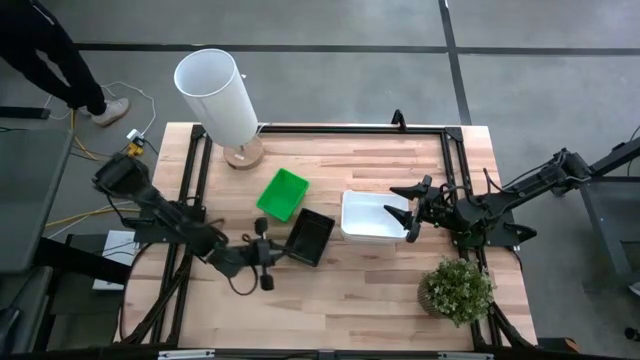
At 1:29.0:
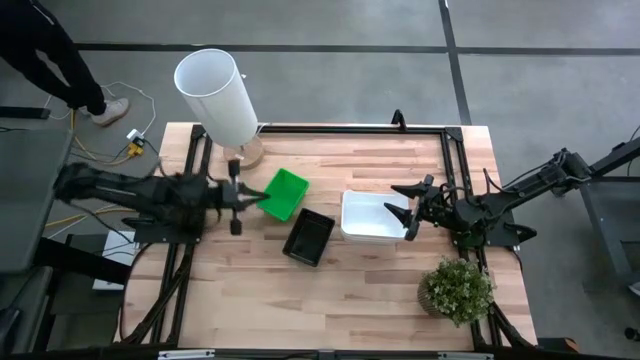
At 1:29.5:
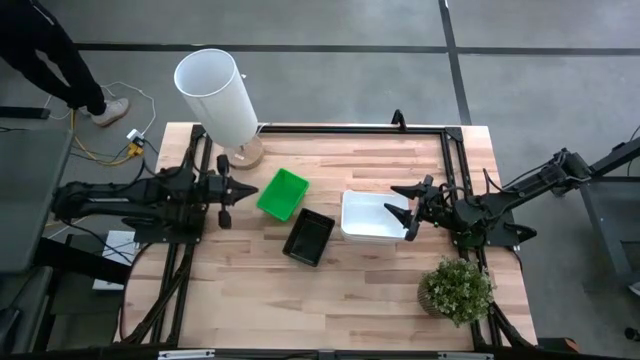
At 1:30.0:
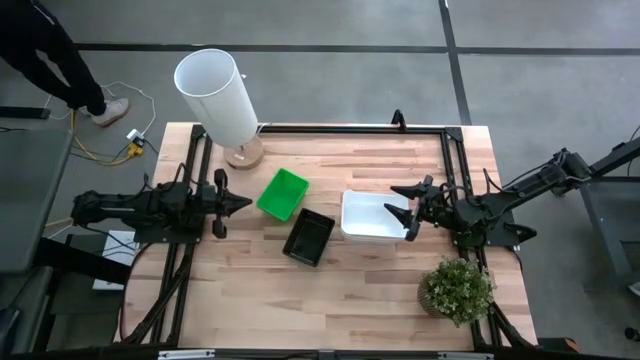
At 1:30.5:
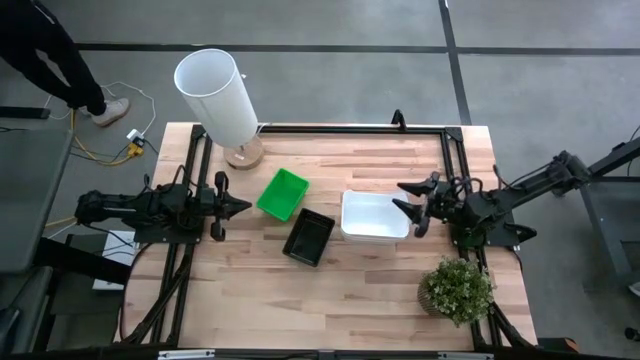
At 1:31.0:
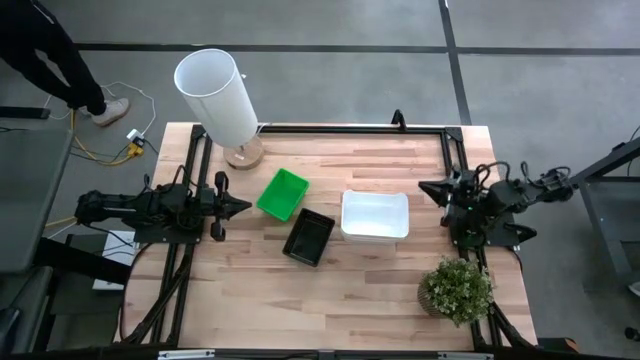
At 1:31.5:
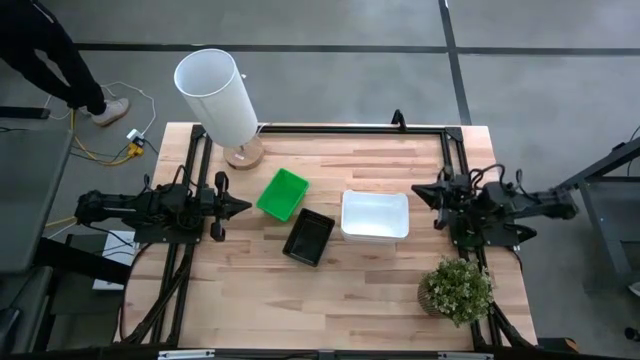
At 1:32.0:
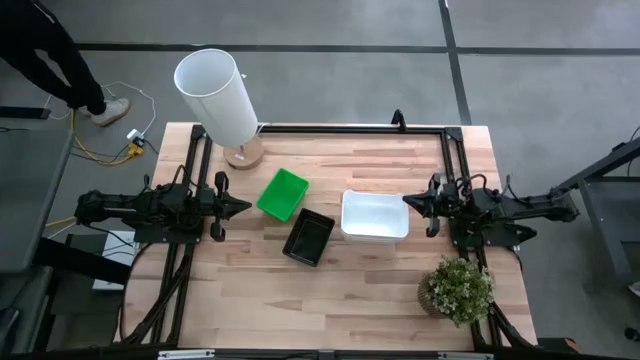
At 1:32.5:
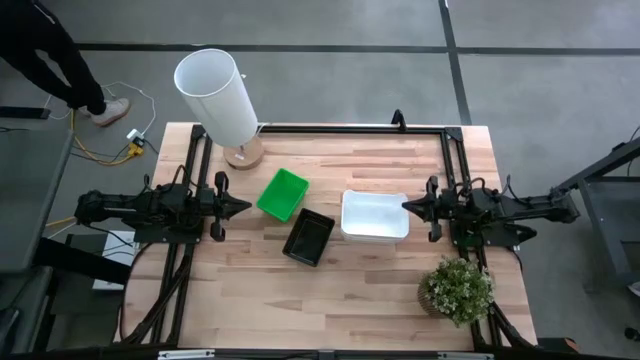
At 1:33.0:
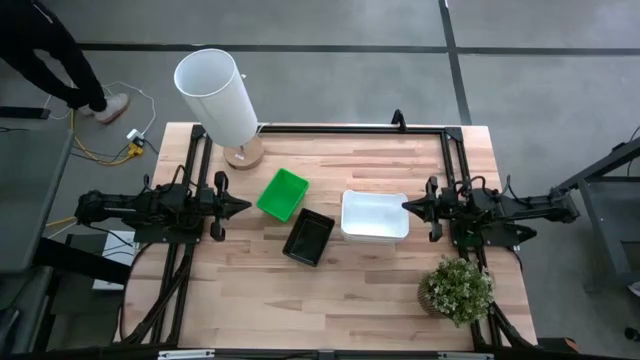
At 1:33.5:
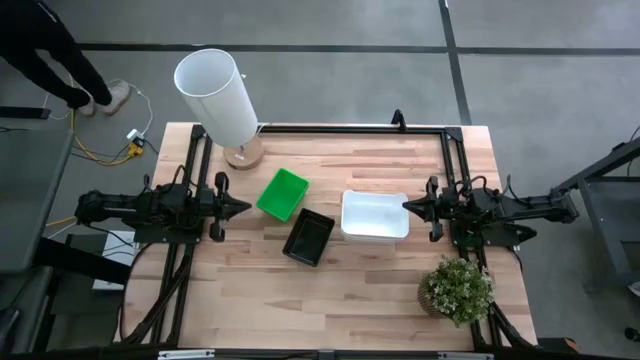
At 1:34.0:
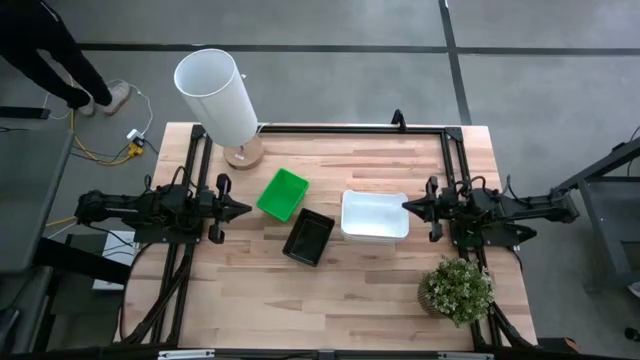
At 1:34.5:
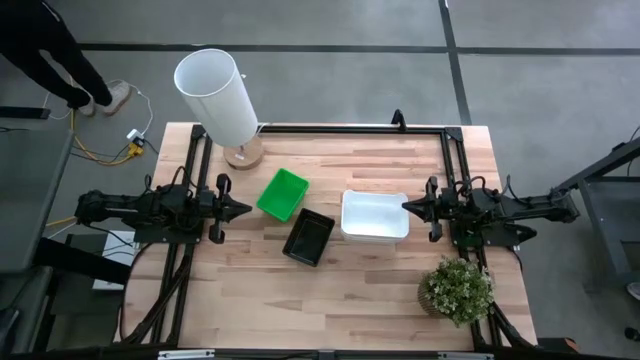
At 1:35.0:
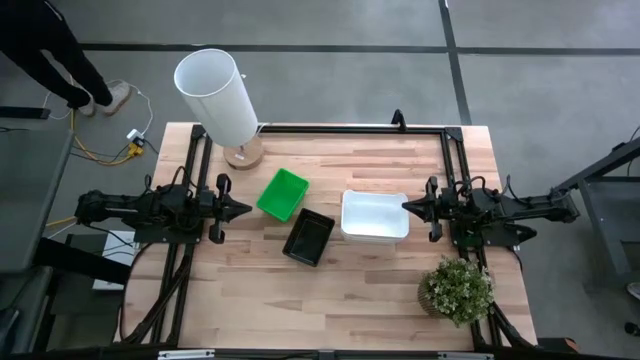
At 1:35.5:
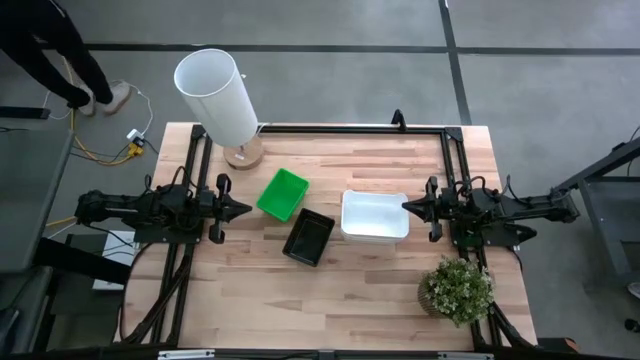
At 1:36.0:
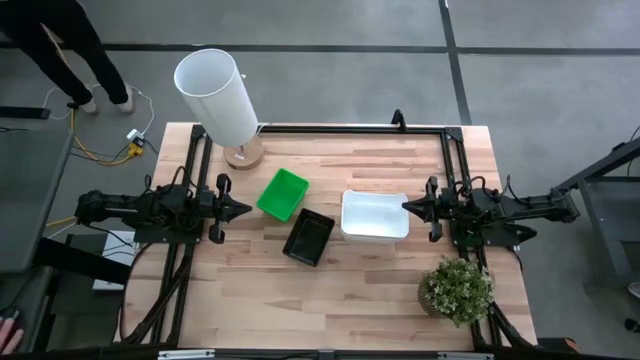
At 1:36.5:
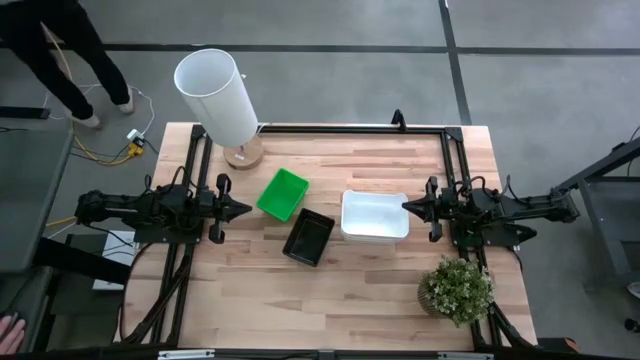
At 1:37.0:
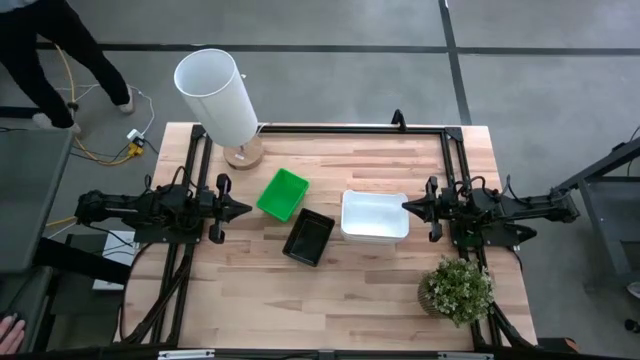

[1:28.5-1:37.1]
Return to Home Position

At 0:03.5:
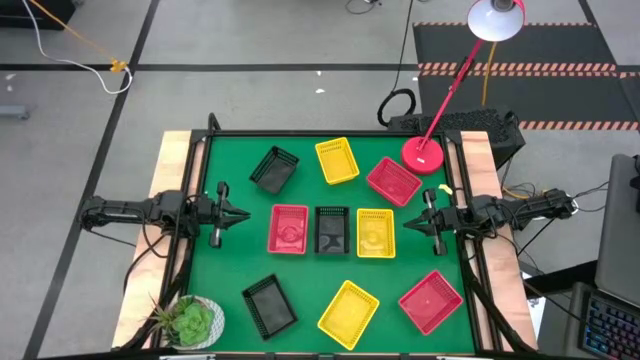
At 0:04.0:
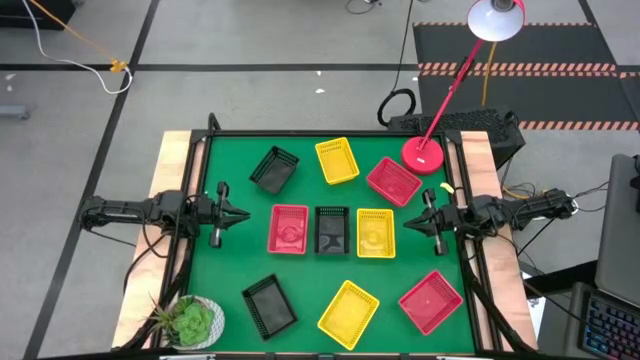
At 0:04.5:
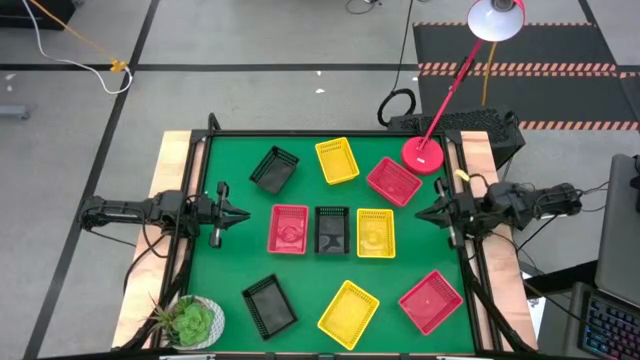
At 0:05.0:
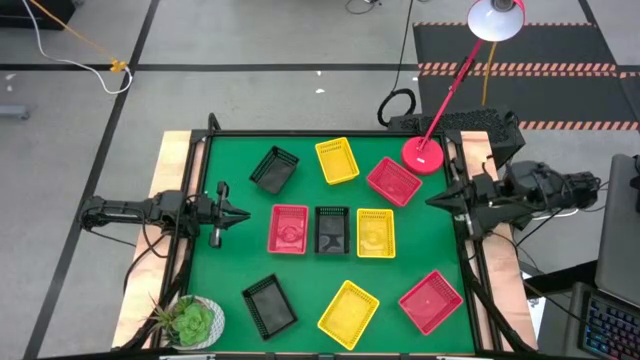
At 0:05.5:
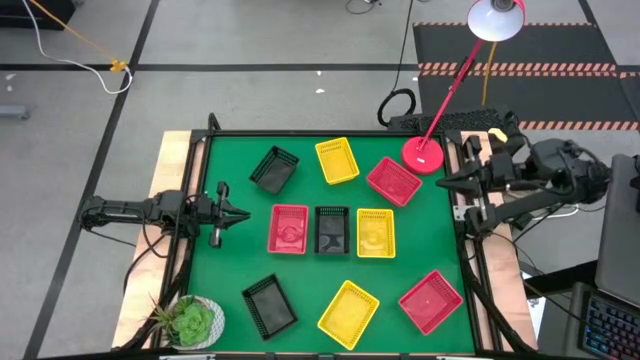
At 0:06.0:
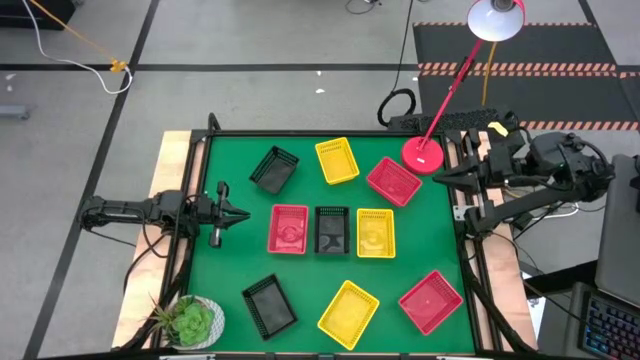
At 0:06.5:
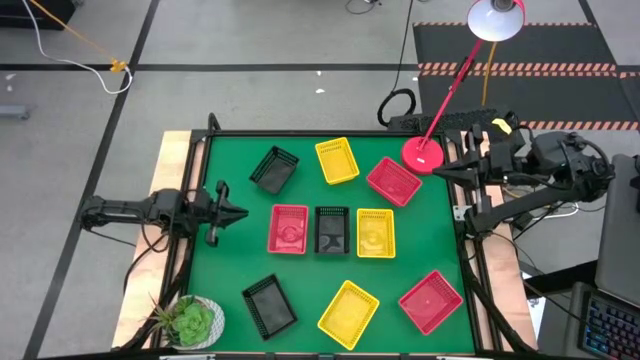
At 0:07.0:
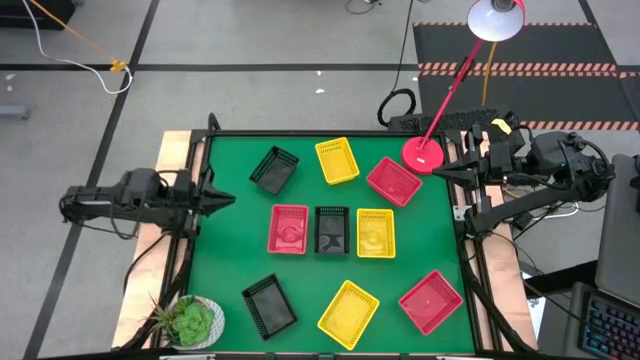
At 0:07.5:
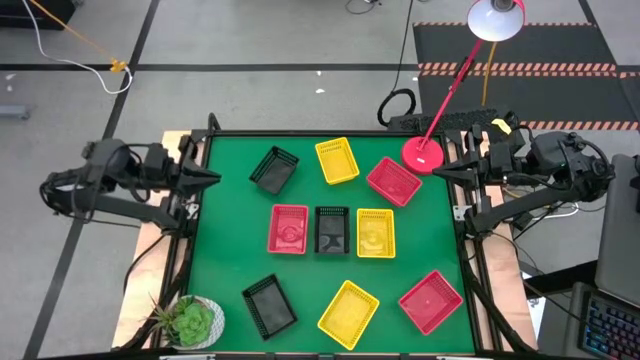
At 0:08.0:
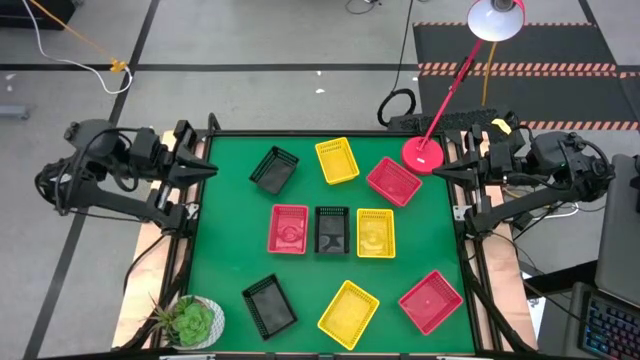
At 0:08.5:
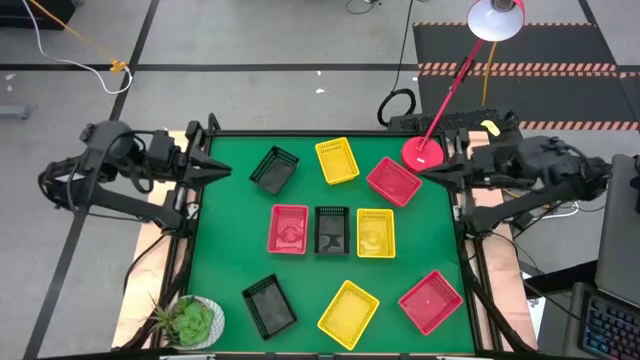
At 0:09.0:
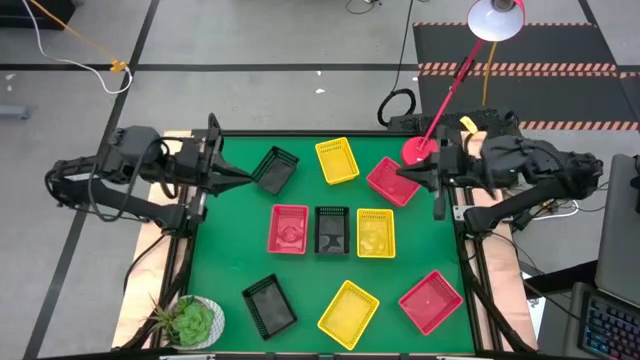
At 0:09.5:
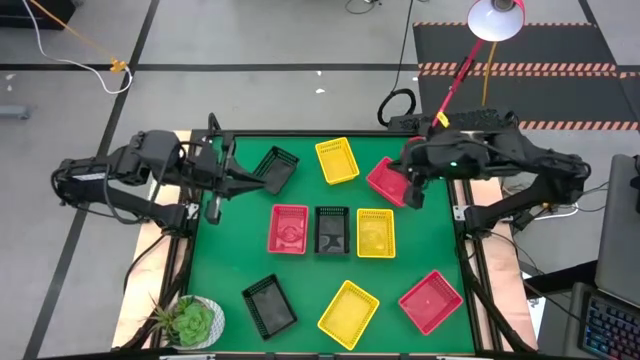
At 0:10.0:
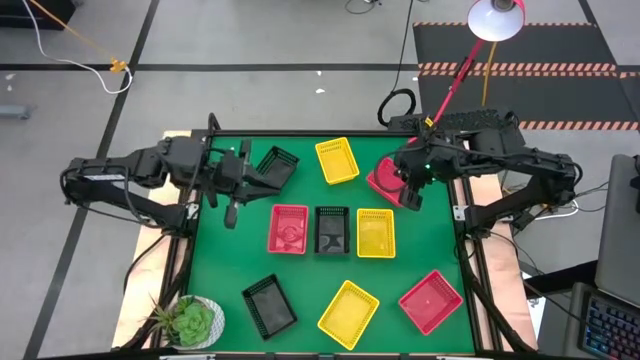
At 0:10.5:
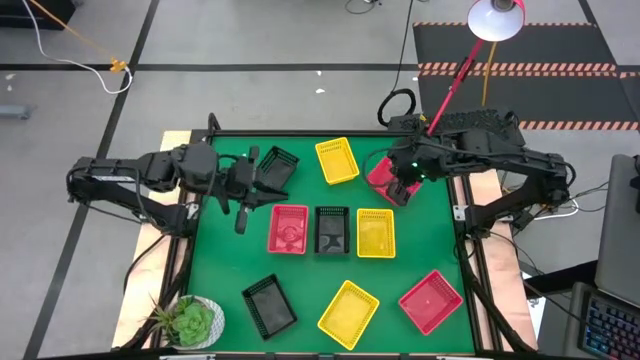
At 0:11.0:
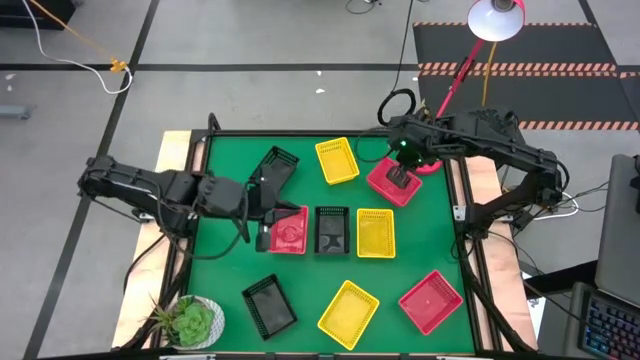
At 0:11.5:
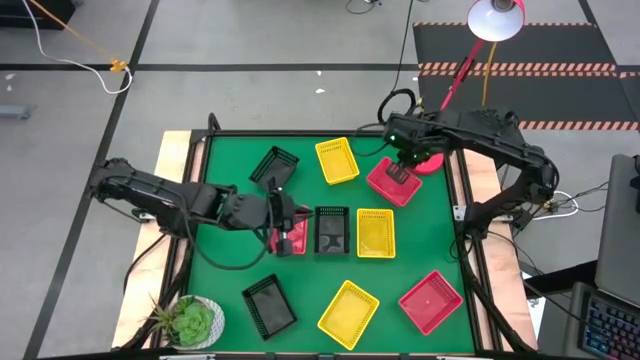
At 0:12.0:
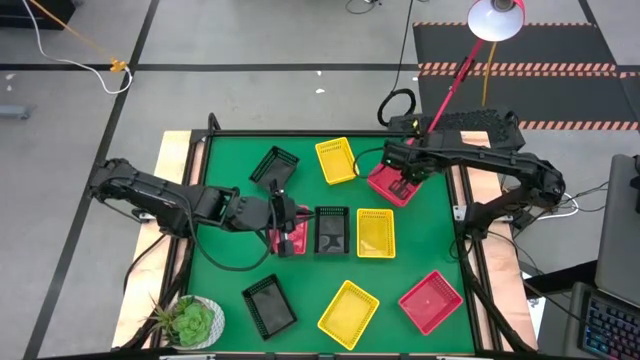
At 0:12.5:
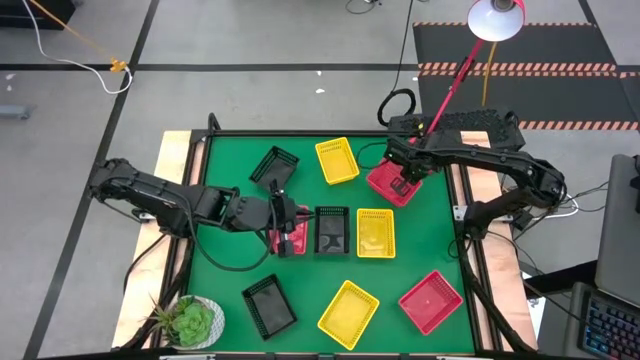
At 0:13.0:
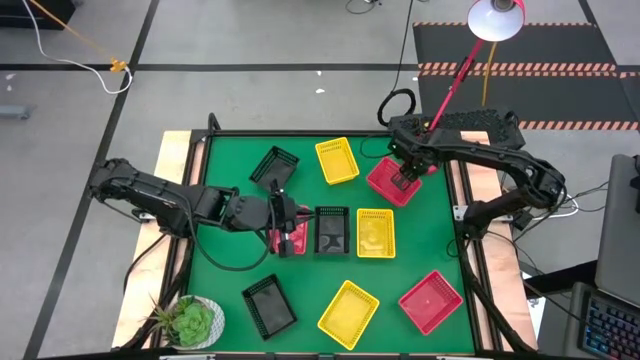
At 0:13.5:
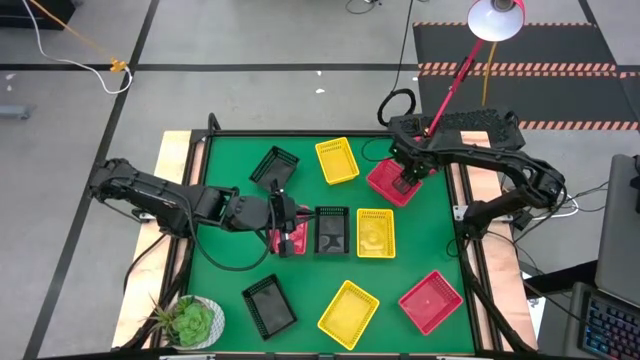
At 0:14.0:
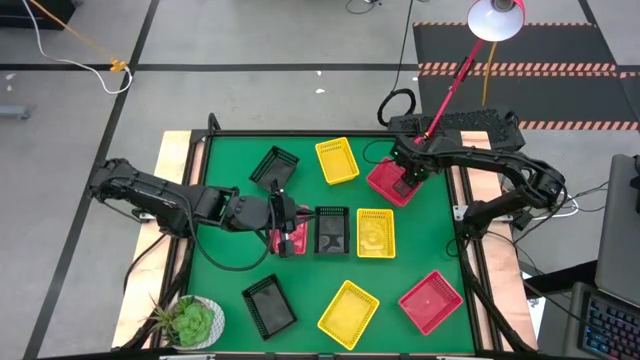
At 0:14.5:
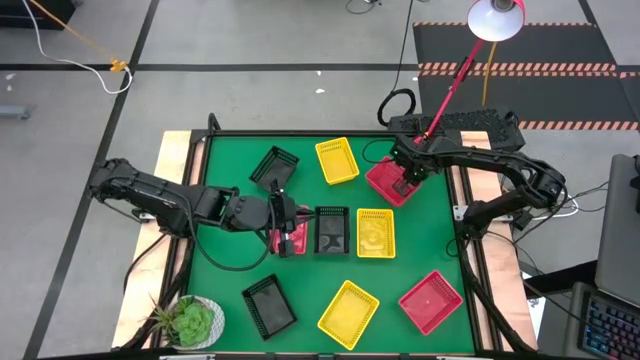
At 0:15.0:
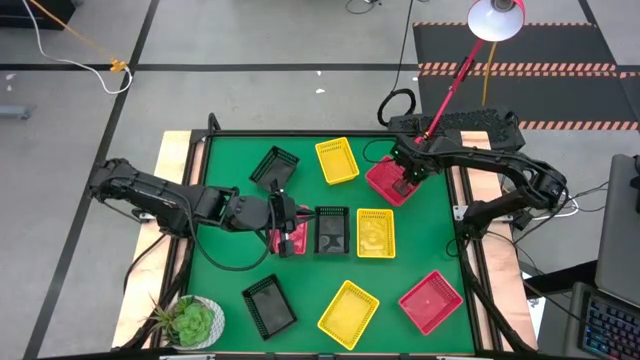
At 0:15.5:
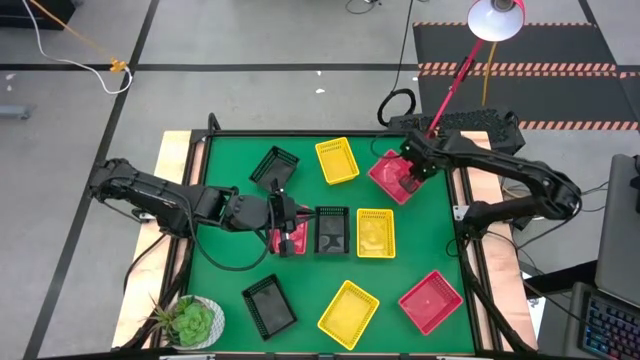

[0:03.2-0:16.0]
Stack the top red bin on top of the middle red bin
